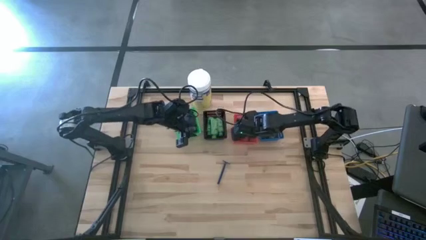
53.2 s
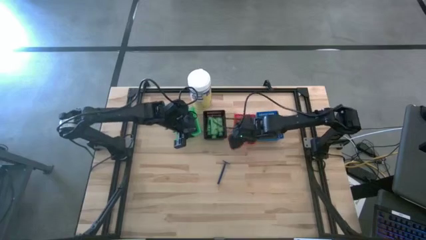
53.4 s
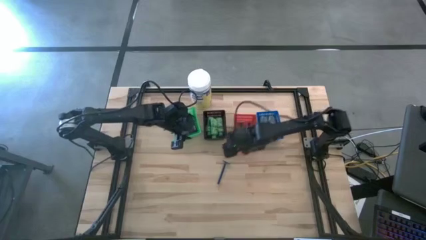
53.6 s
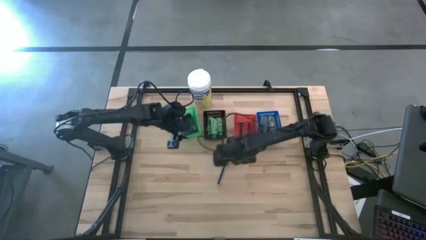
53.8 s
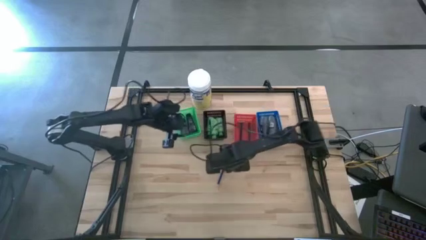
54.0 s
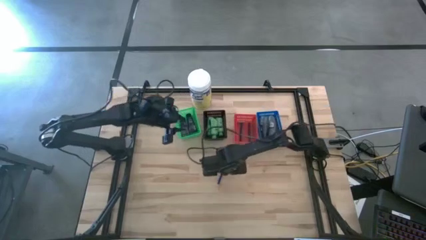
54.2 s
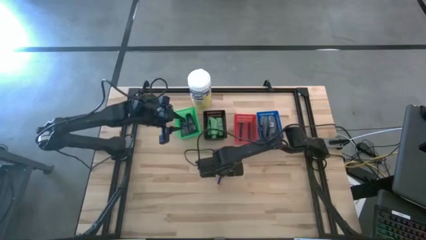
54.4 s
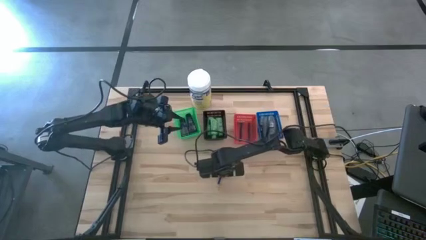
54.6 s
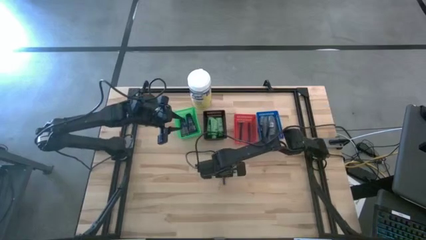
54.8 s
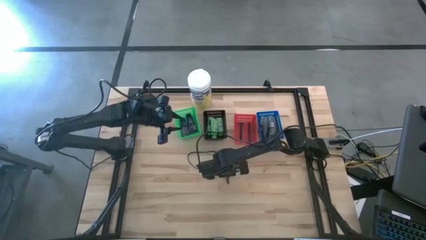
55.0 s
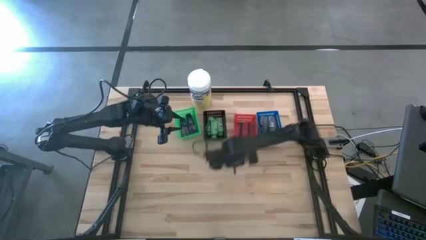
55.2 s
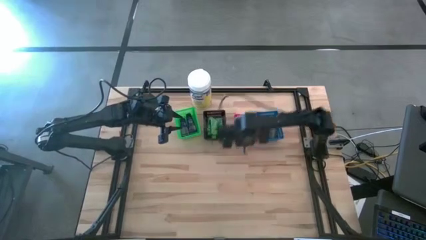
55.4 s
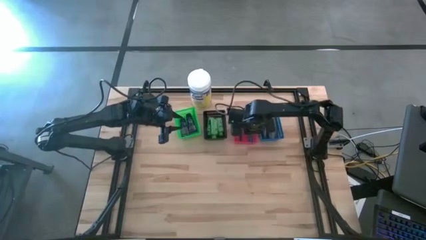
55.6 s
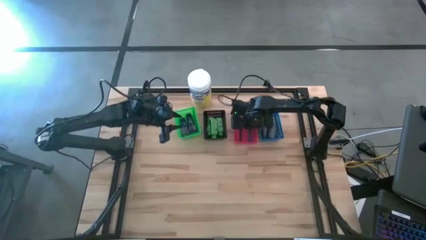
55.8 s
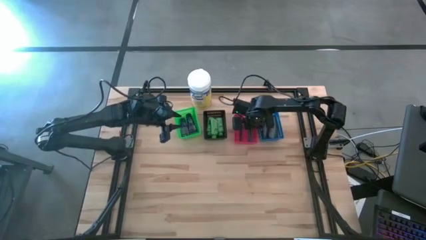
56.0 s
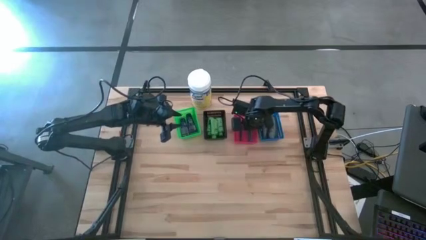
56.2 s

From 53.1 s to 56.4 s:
Task: Pick & Place Travel size toiletries
Put the blue shavers into the red bin

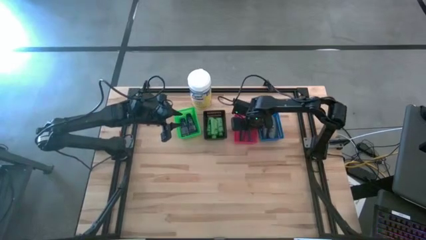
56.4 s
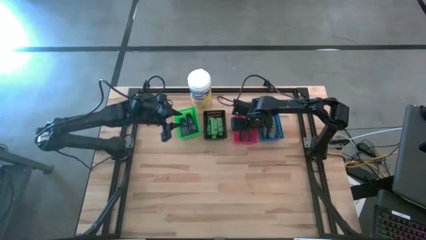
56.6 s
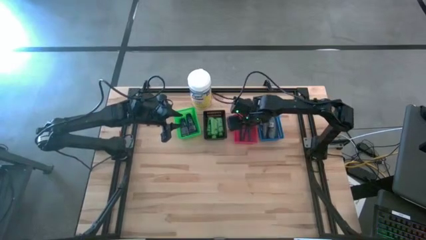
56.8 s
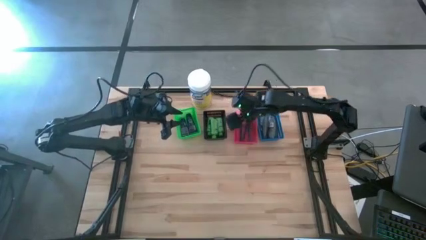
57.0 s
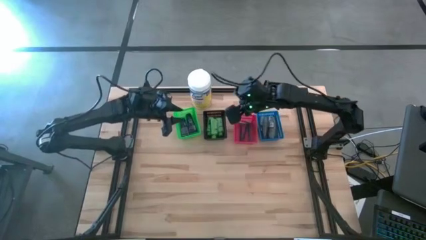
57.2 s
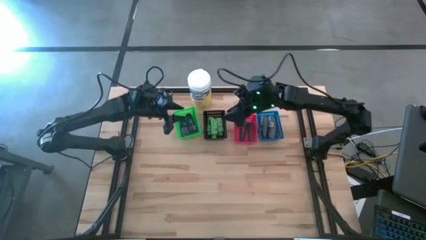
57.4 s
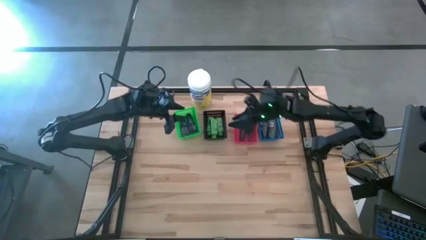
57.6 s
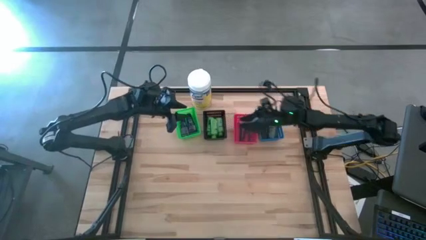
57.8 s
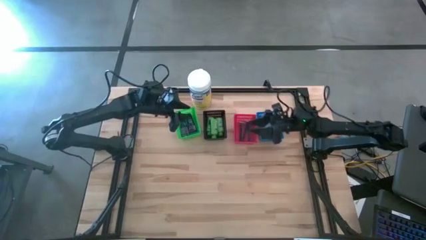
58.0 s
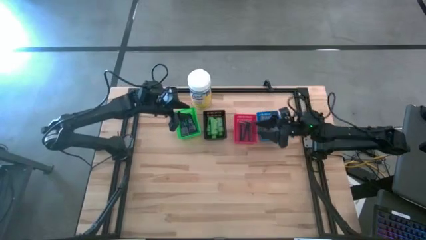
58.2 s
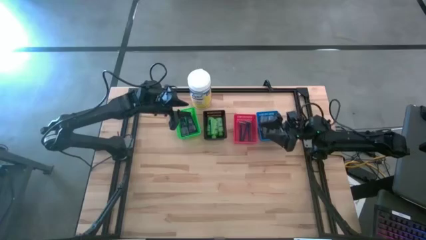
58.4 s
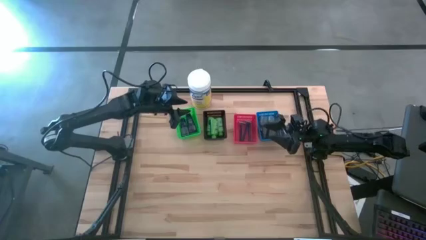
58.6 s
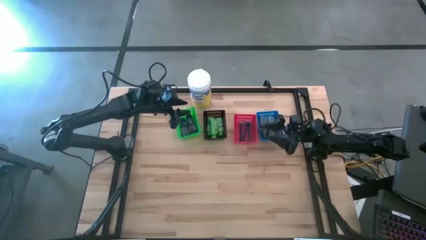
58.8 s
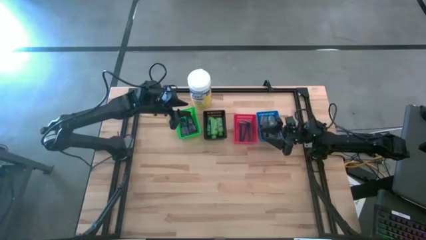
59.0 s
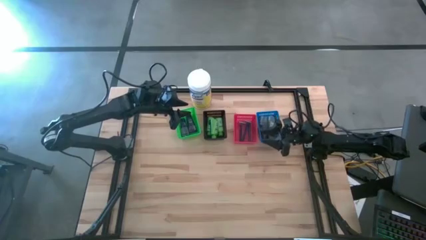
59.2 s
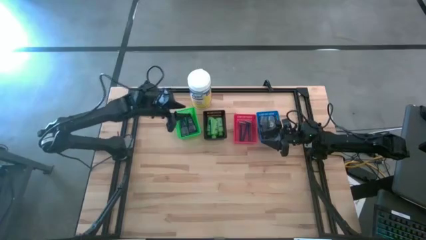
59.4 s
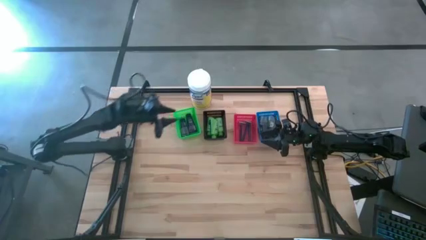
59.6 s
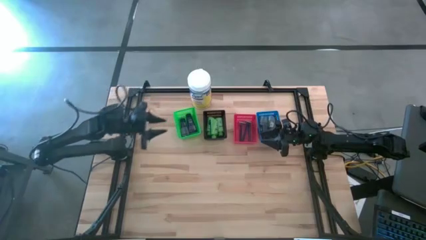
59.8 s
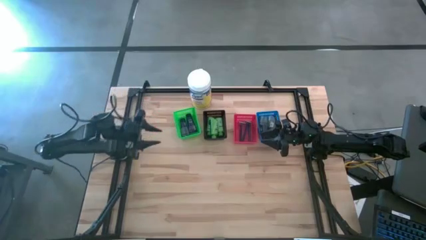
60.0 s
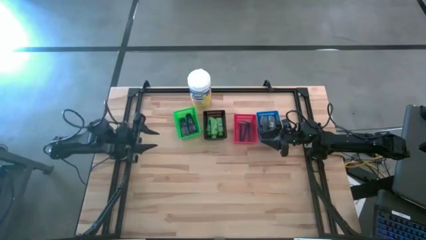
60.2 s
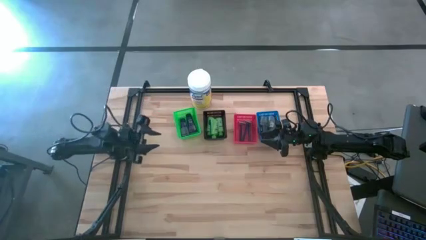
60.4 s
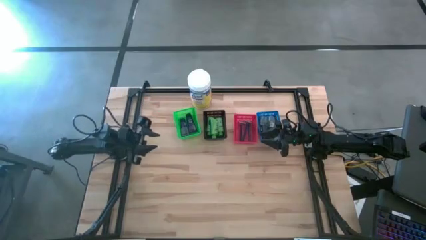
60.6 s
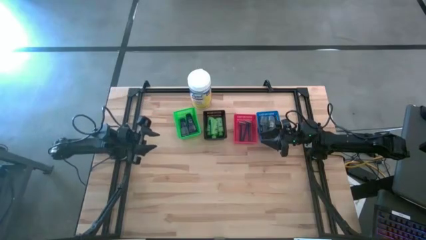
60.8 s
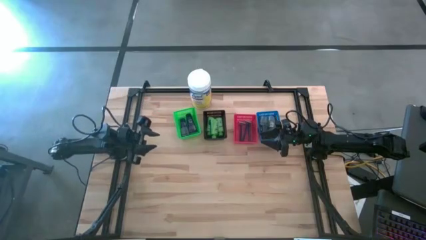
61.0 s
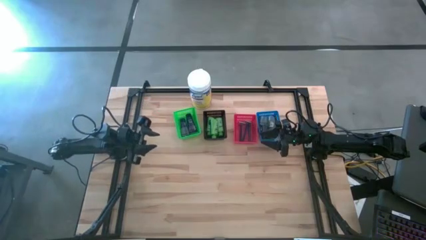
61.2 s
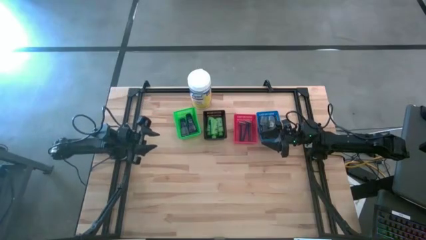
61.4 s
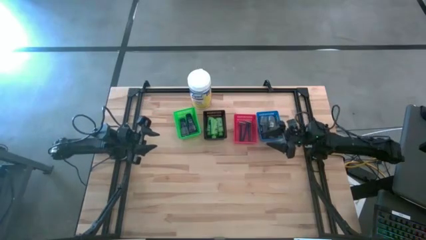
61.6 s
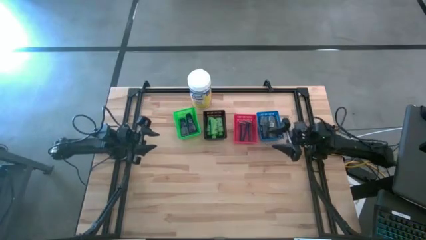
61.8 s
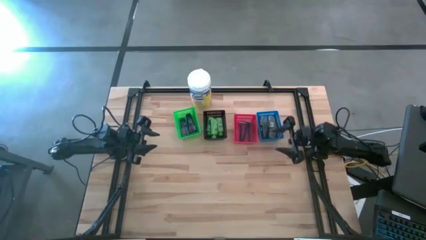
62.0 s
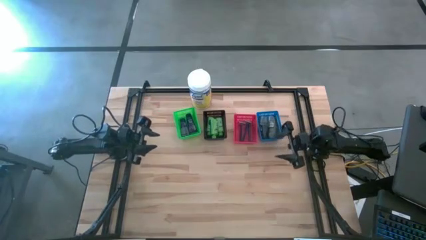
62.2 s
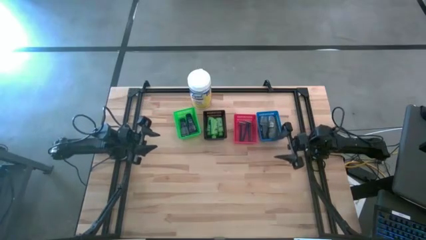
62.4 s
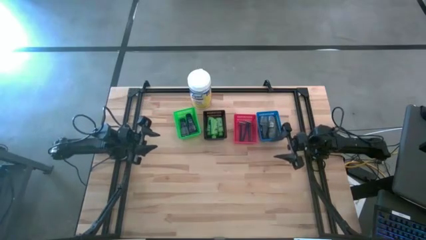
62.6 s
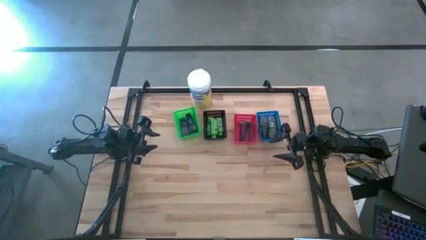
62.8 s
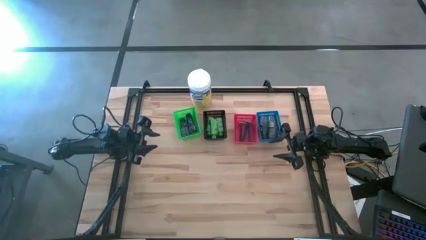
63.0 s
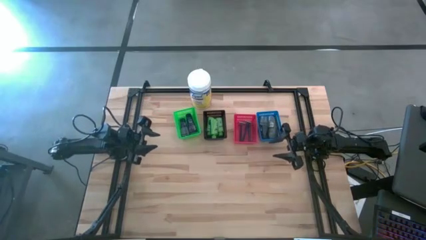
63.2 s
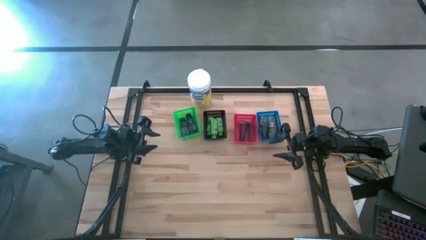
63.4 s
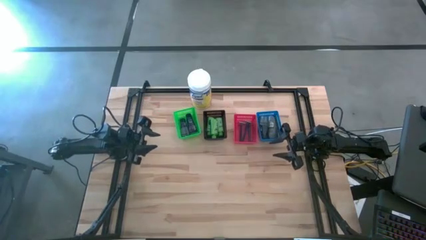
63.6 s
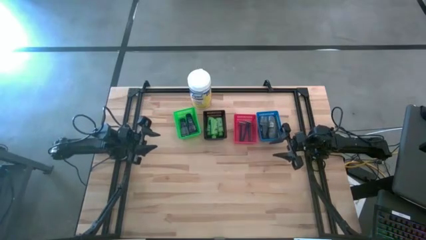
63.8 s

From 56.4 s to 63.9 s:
Return to Home Position

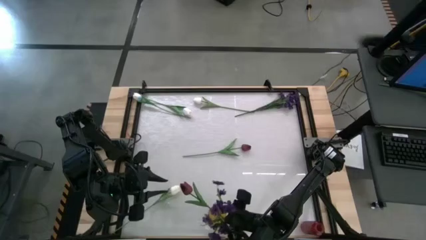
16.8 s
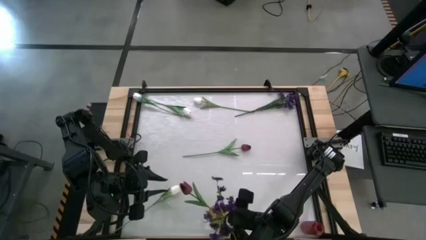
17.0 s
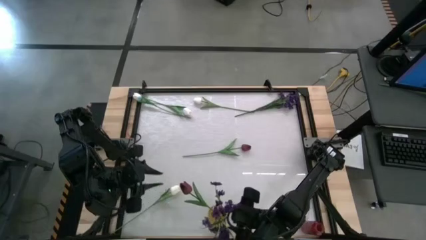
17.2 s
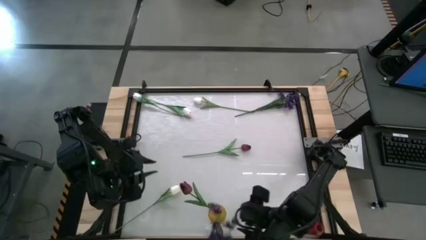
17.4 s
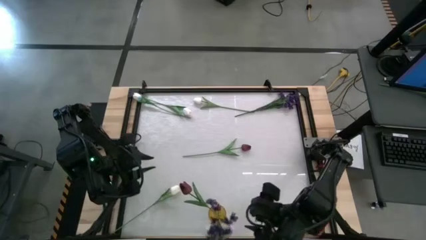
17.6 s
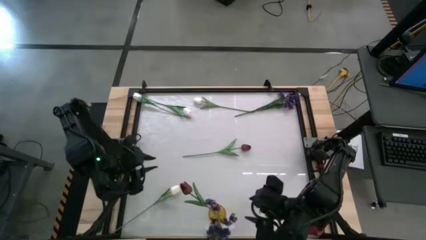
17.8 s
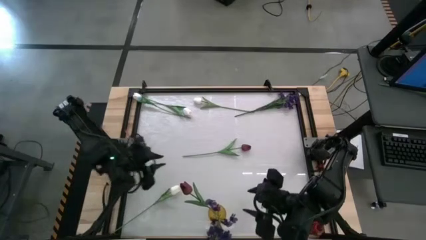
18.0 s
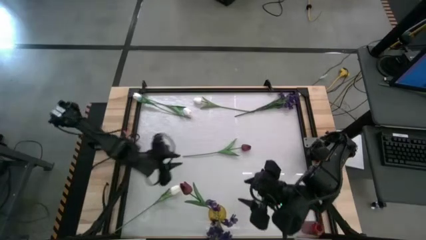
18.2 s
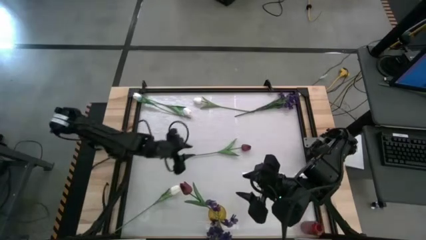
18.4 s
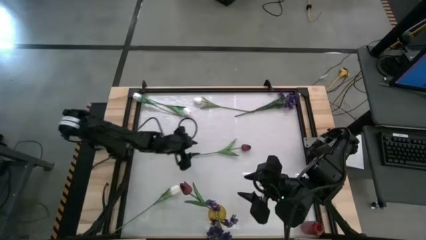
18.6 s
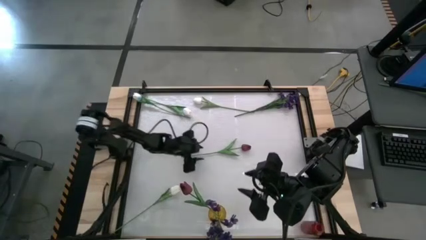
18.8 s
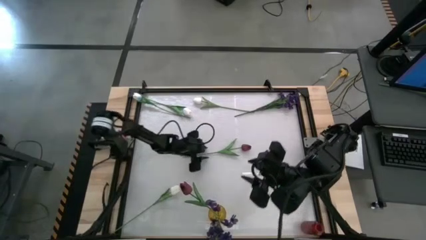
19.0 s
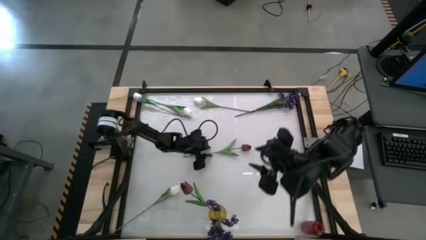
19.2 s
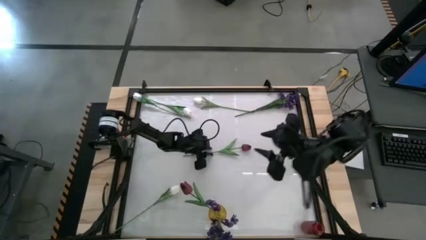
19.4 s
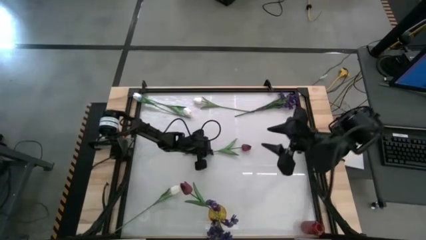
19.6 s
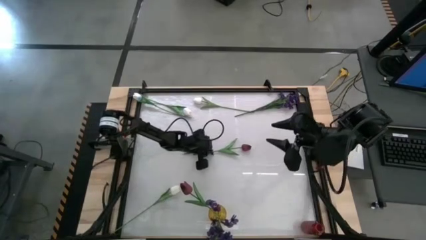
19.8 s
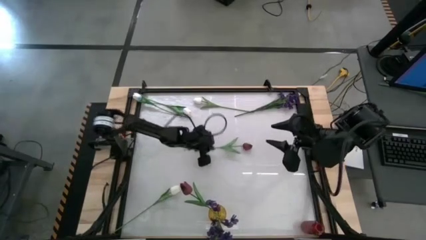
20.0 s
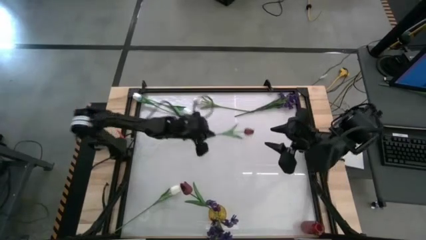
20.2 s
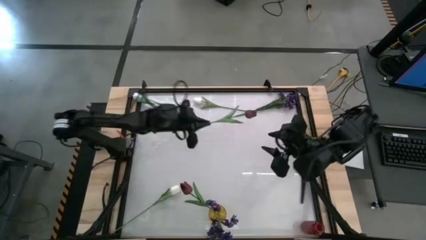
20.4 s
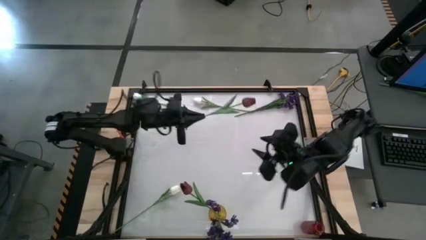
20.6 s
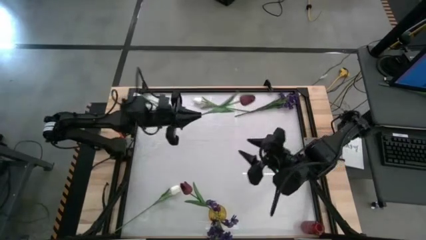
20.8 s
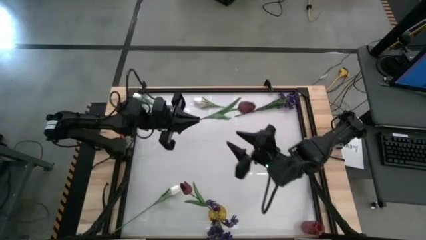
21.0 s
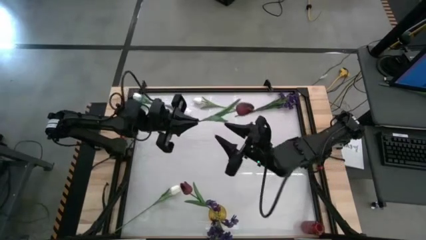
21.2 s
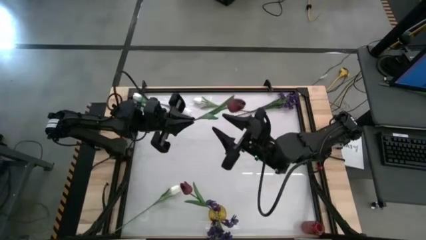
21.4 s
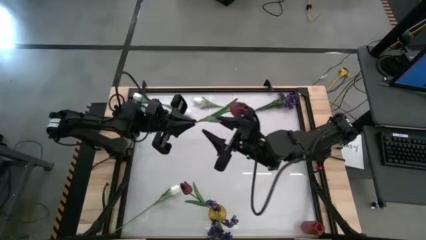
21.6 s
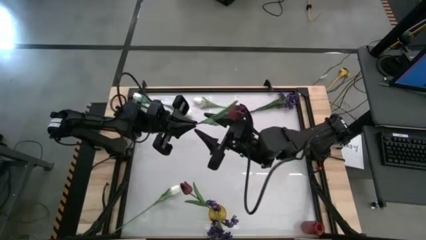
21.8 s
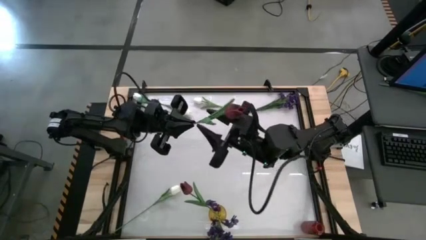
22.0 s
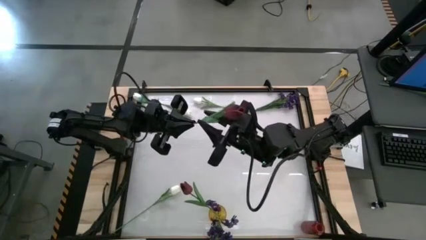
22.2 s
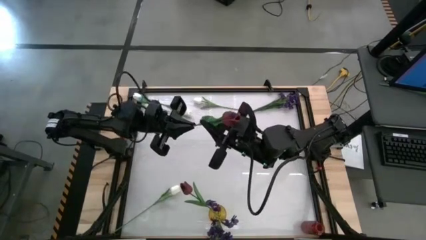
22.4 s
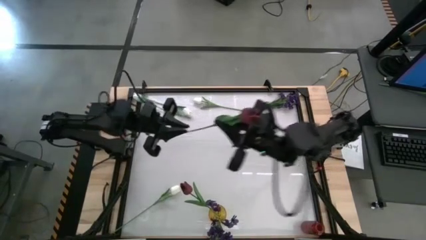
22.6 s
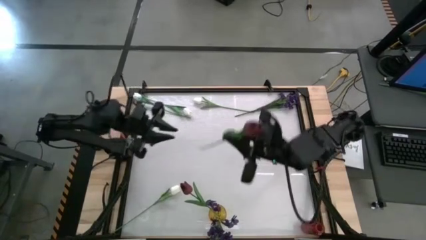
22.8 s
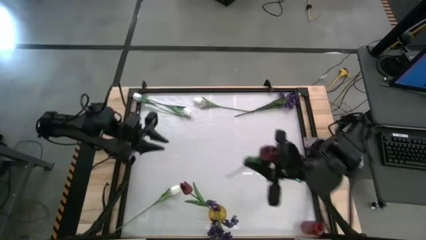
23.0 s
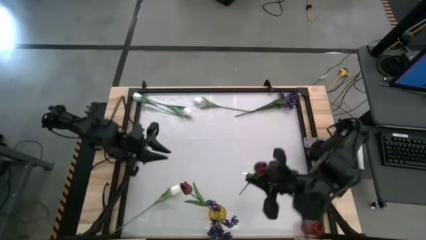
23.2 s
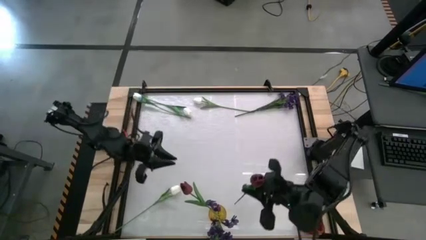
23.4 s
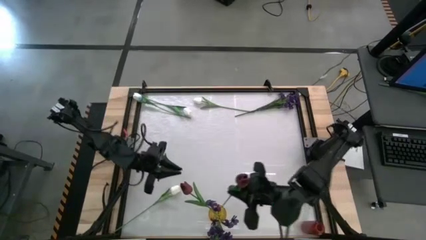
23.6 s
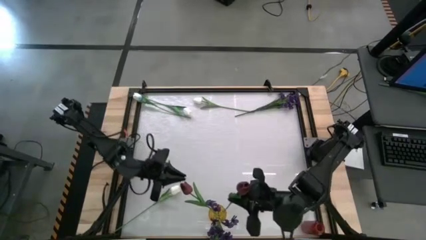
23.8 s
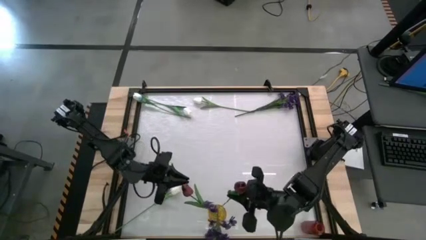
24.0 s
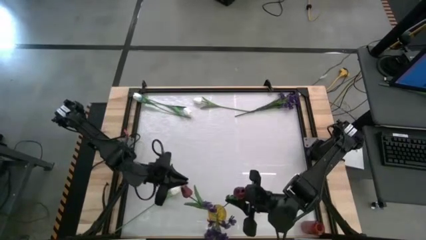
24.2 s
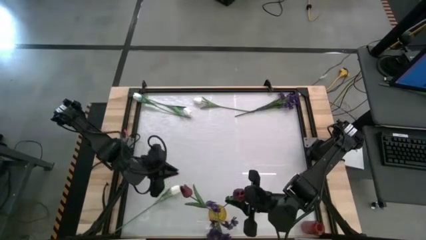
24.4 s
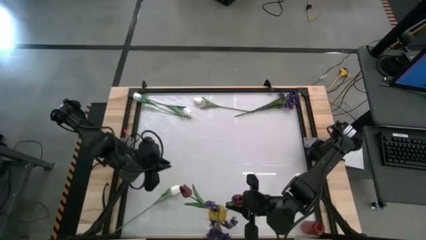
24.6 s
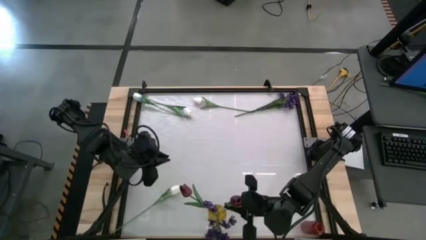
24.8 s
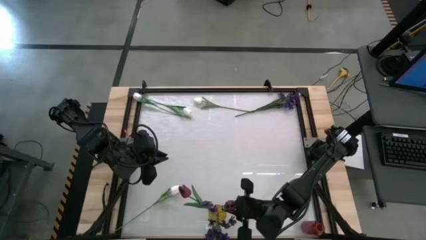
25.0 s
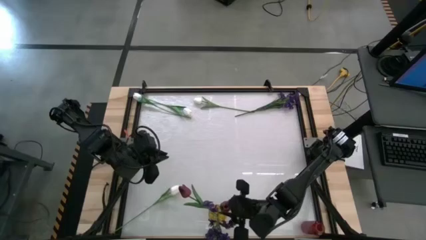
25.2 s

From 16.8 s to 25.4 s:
Task: Sort flowers into vase by color
Put the red flower into the yellow vase
